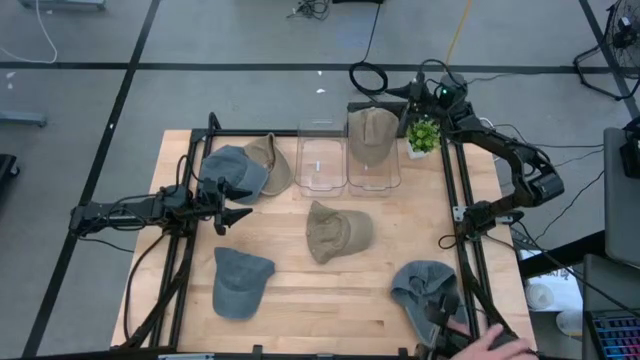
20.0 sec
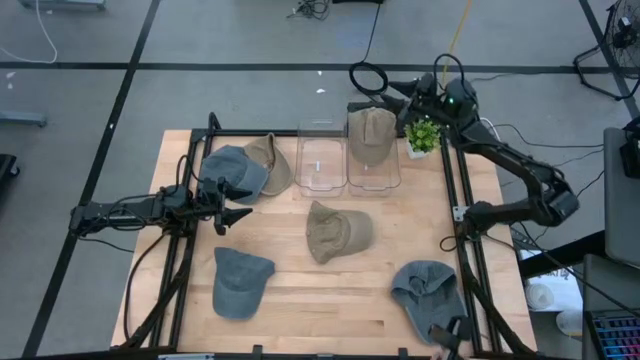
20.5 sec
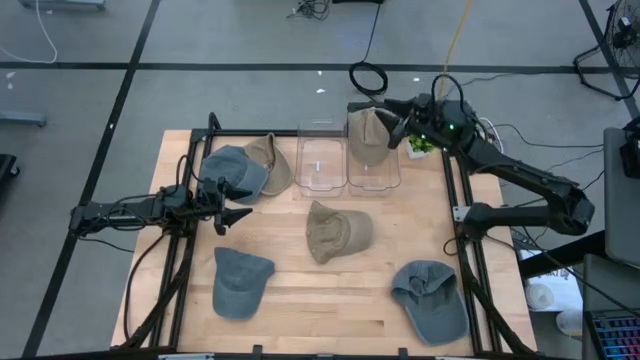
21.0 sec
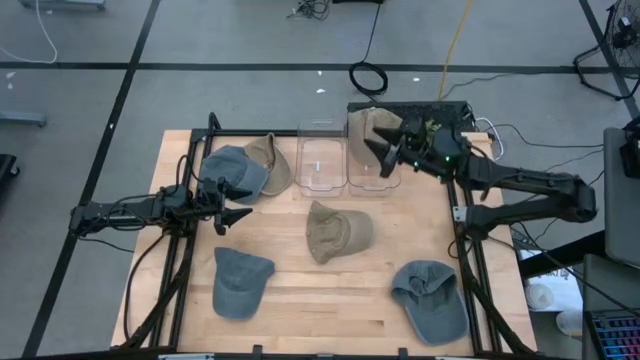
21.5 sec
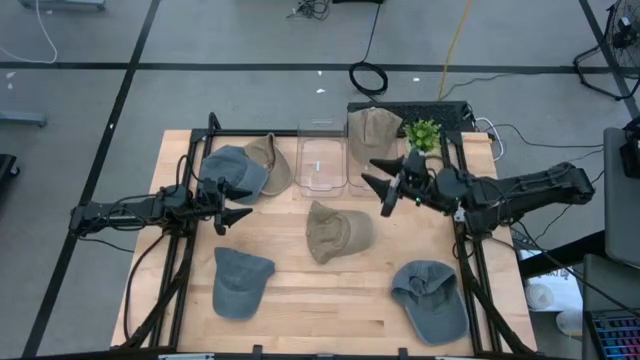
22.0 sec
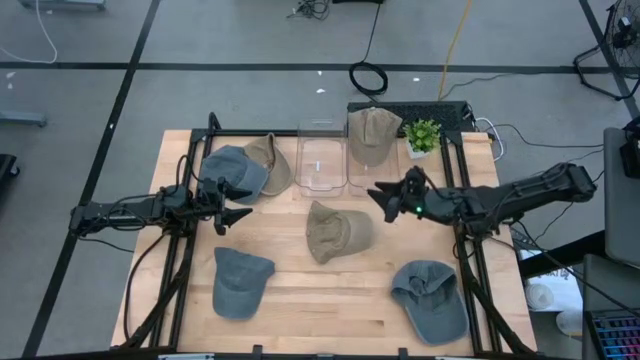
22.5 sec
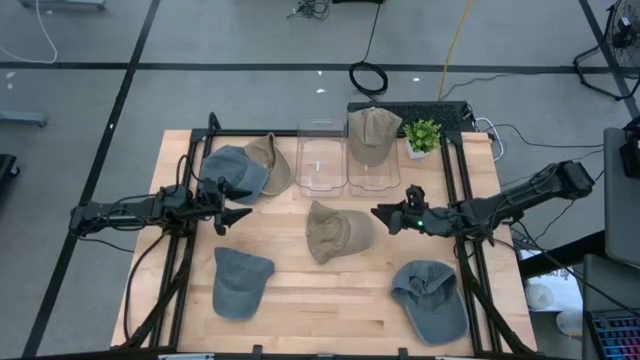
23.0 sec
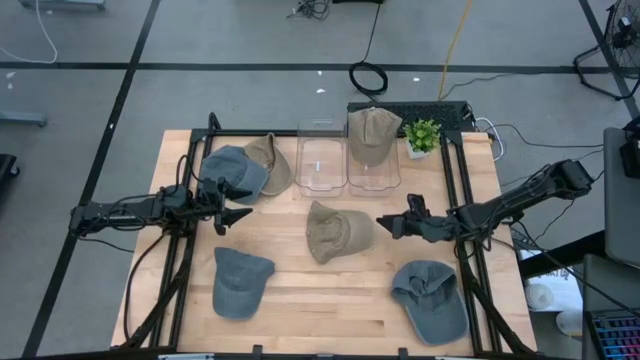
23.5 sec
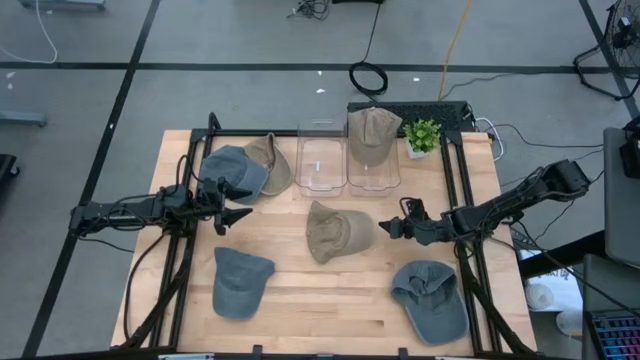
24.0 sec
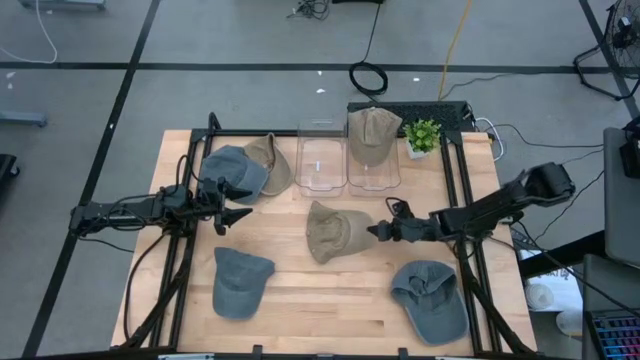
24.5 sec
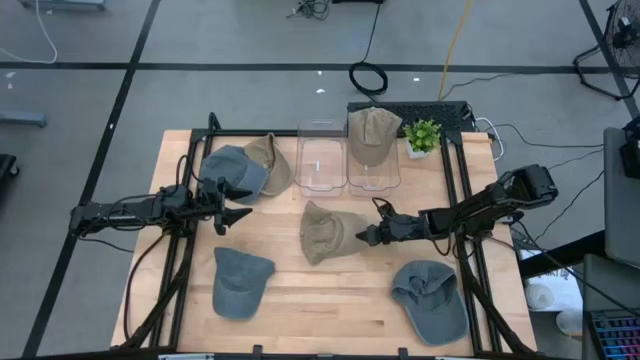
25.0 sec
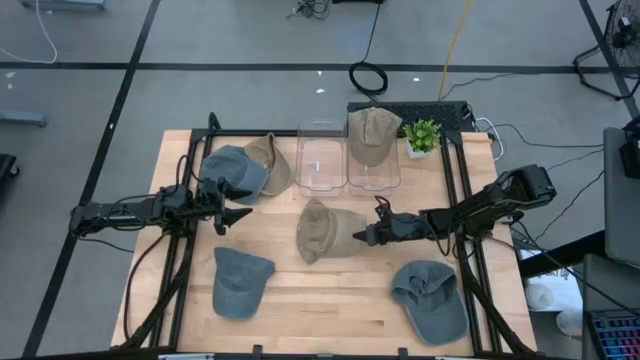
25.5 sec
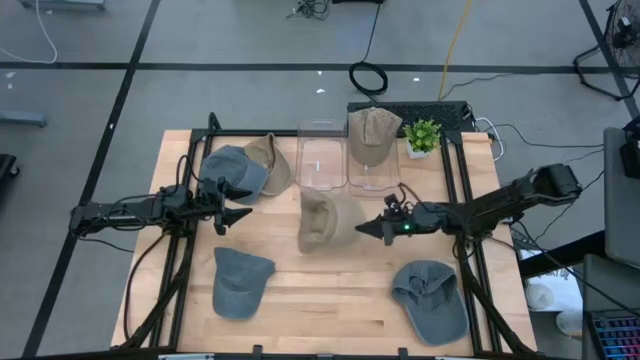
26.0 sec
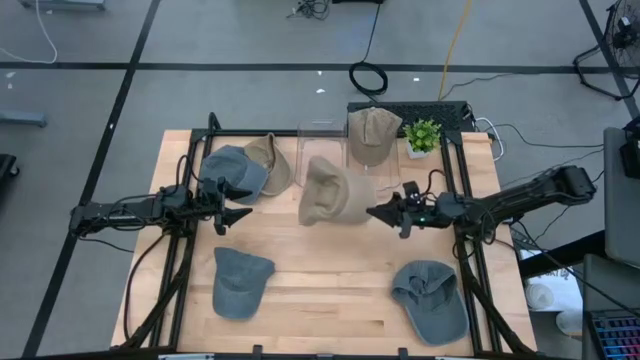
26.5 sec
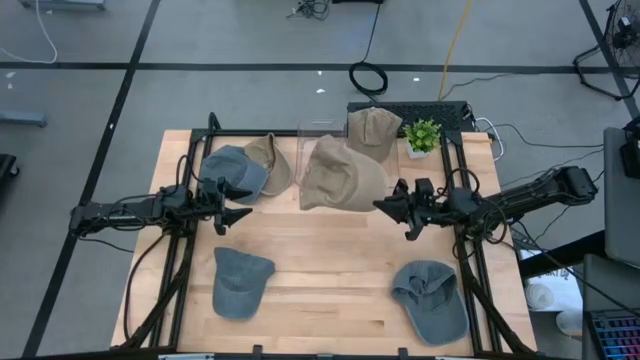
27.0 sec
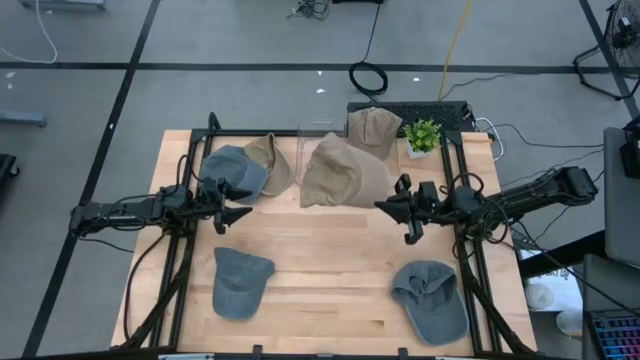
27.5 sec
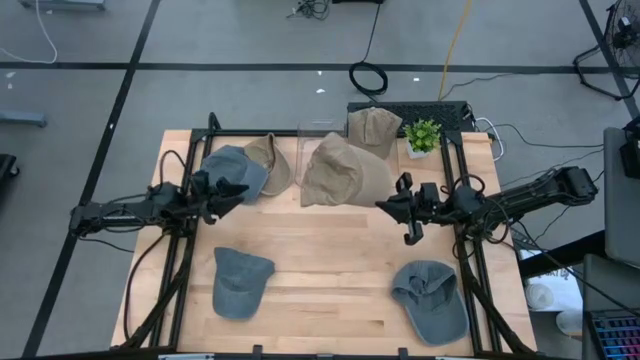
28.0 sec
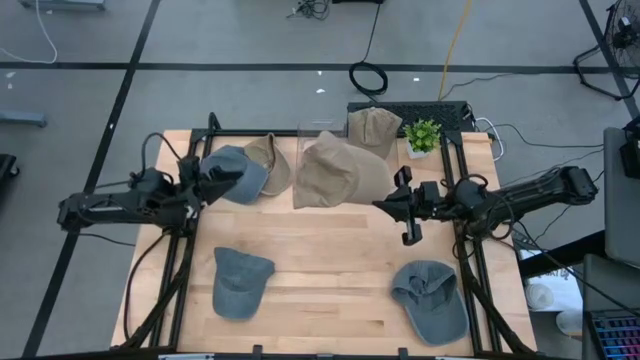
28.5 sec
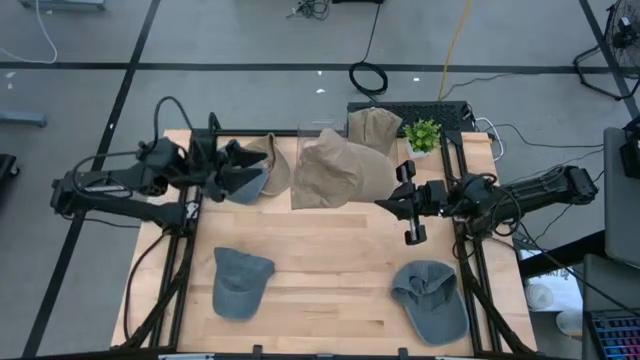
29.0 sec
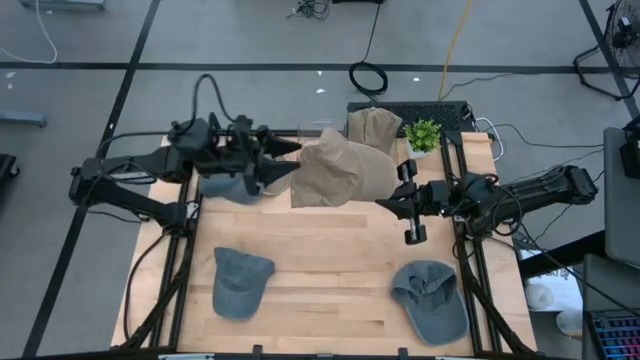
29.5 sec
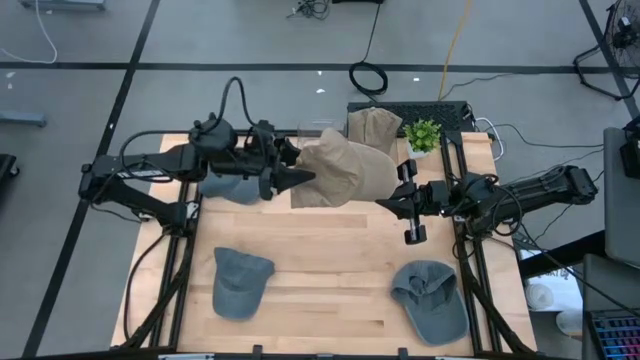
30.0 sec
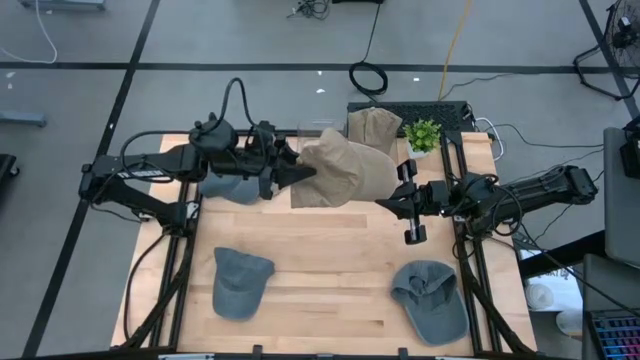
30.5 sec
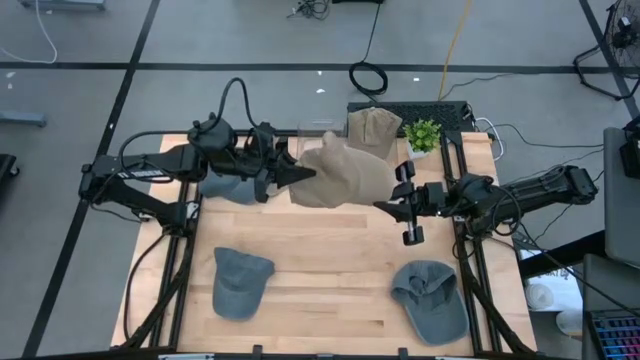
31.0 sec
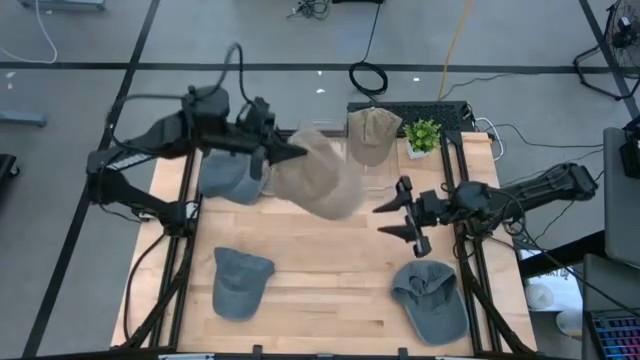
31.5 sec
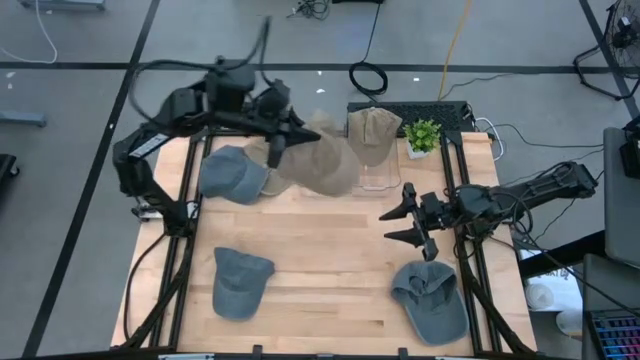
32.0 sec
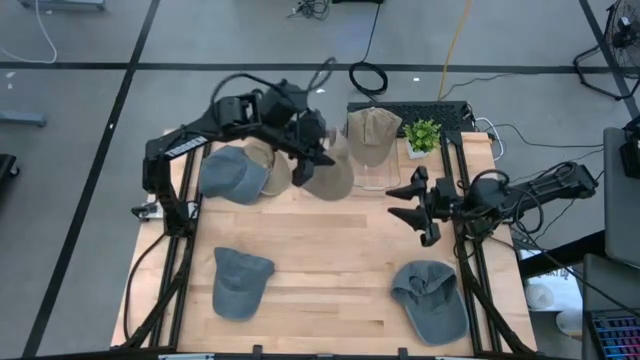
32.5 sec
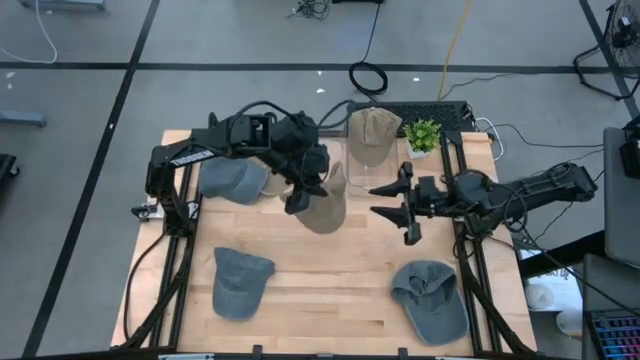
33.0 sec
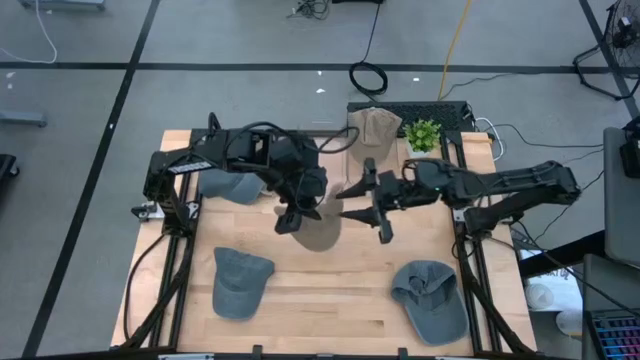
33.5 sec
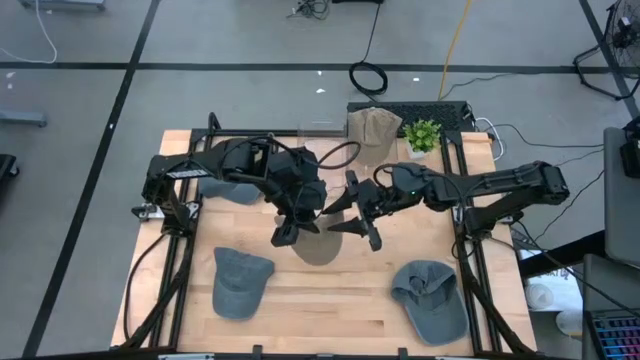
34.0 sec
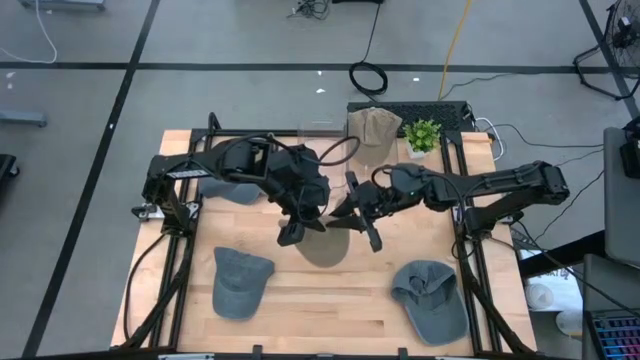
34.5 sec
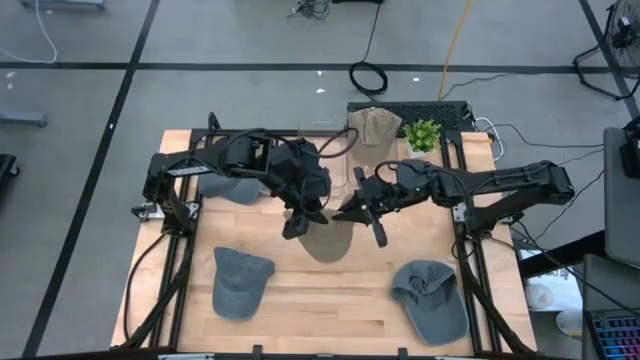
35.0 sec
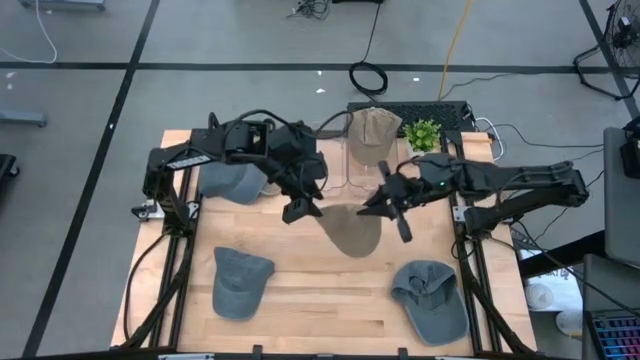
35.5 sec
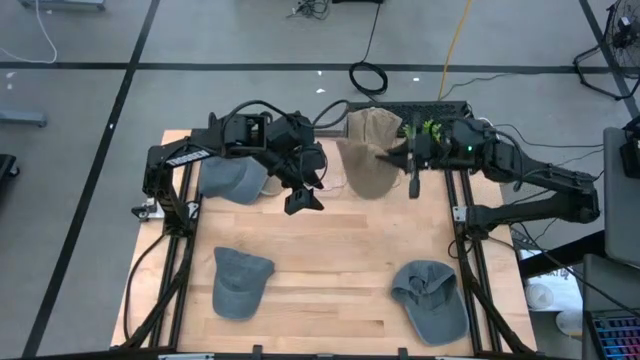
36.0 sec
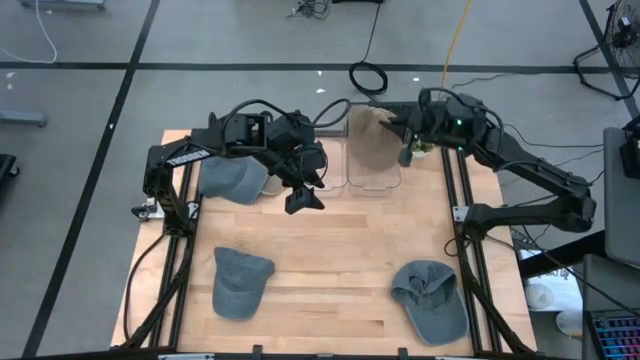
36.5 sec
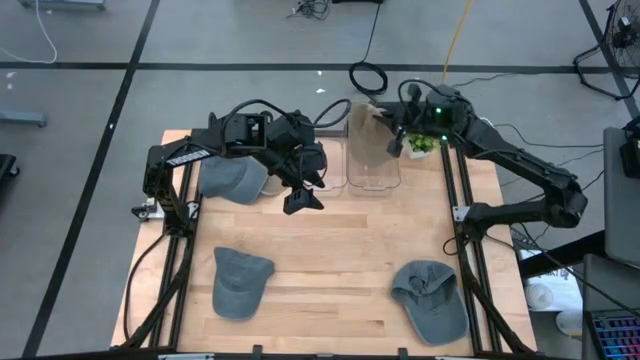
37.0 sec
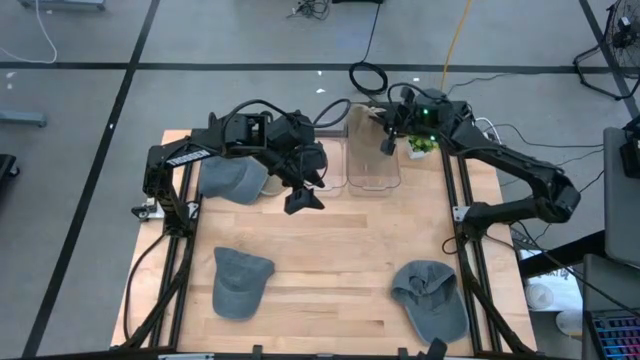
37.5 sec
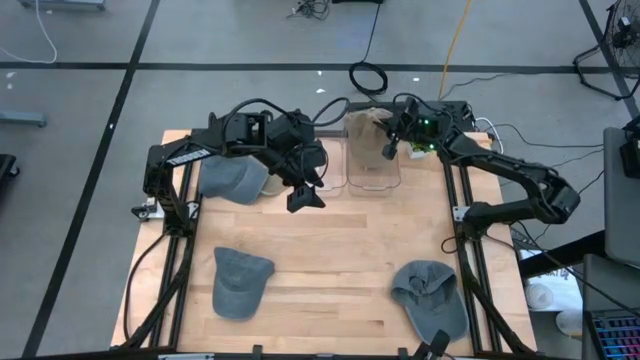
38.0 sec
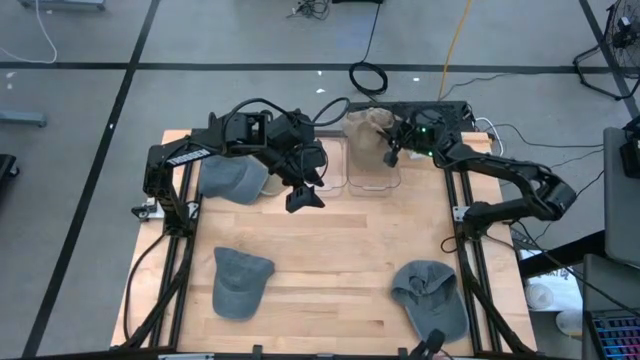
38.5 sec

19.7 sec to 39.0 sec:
Task: Pick & Place hat
Put the right brown cap into the right transparent bin
